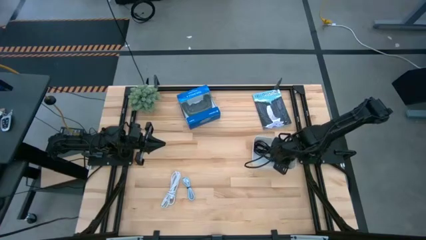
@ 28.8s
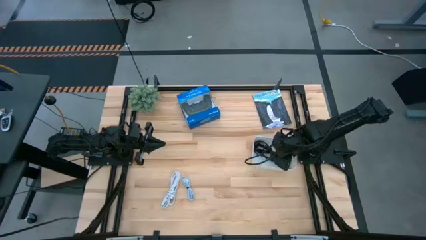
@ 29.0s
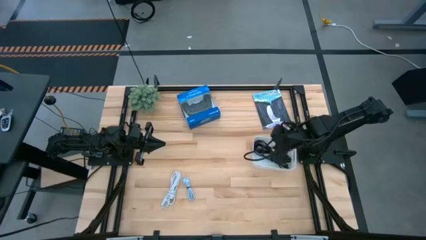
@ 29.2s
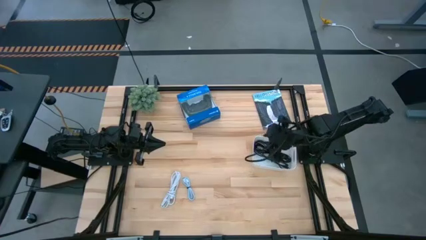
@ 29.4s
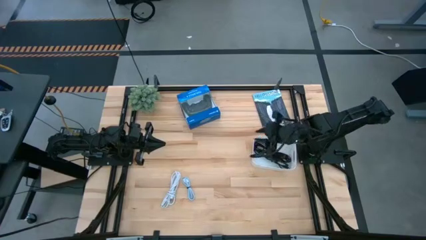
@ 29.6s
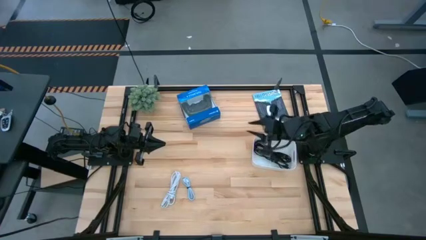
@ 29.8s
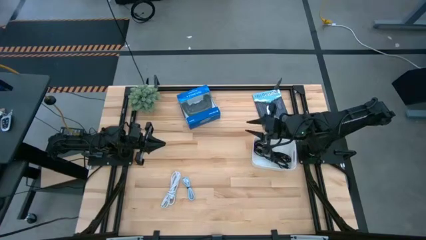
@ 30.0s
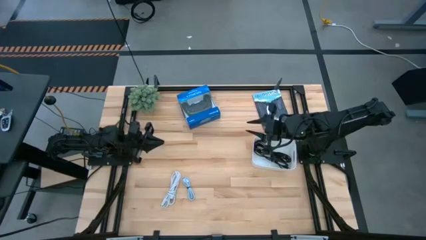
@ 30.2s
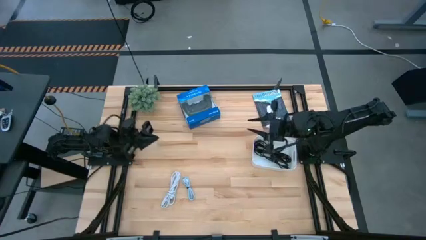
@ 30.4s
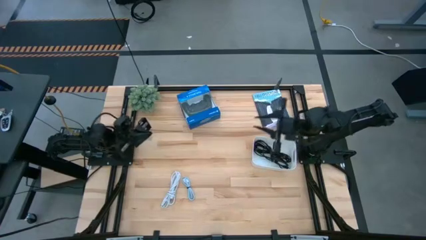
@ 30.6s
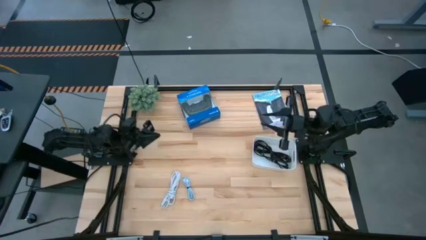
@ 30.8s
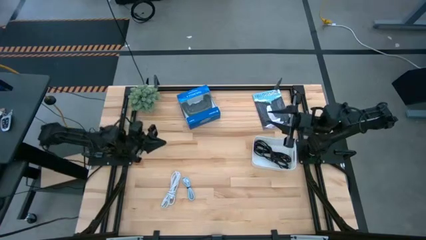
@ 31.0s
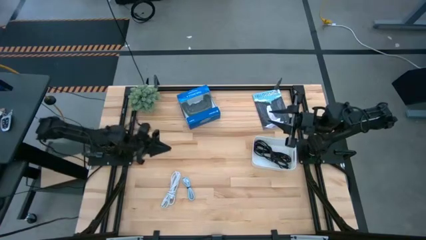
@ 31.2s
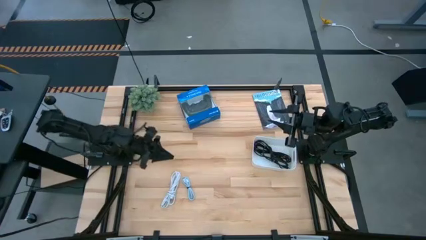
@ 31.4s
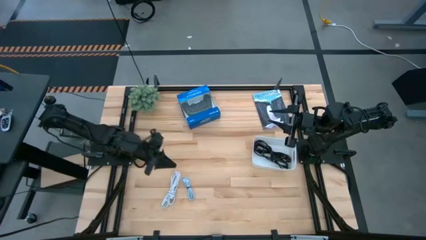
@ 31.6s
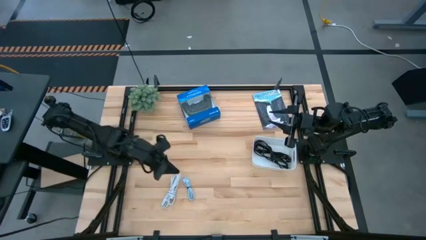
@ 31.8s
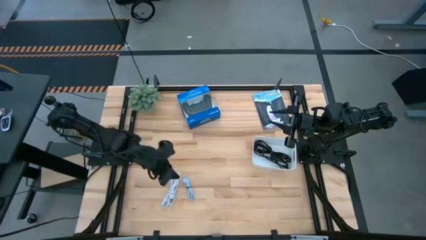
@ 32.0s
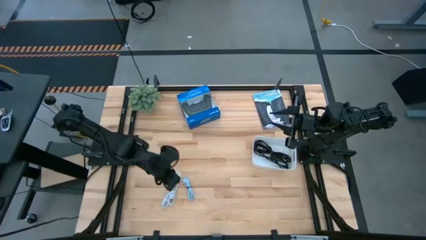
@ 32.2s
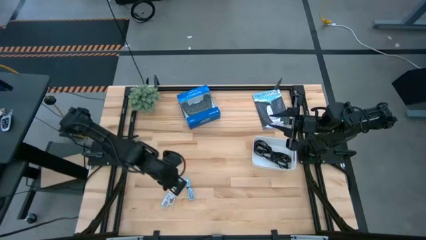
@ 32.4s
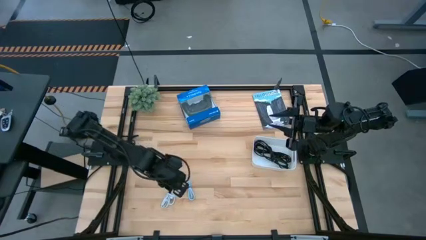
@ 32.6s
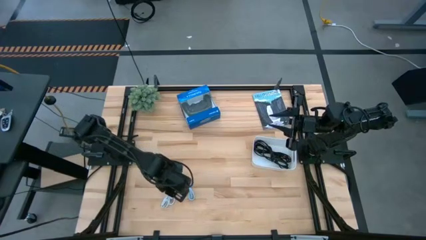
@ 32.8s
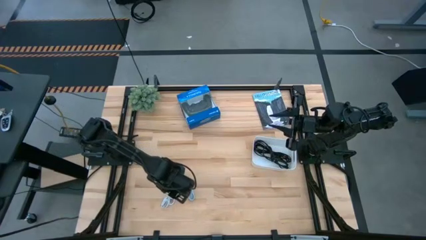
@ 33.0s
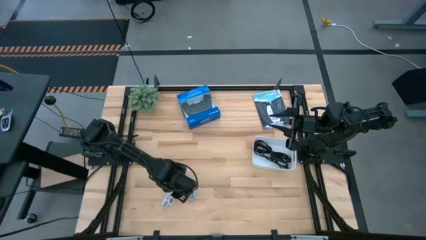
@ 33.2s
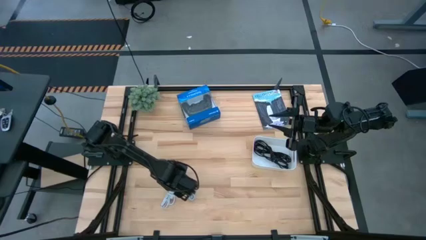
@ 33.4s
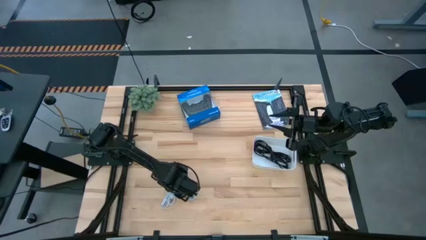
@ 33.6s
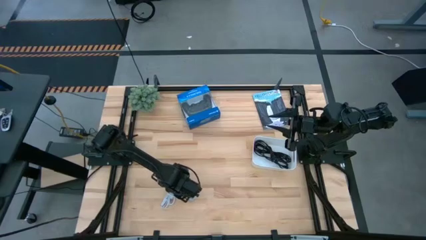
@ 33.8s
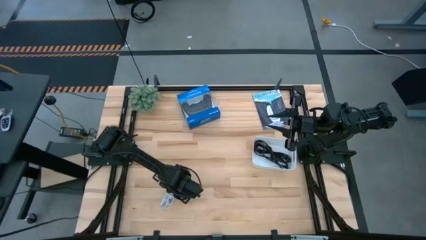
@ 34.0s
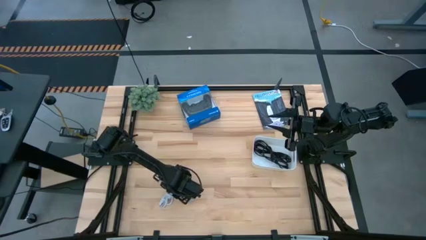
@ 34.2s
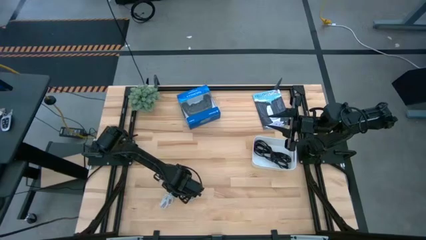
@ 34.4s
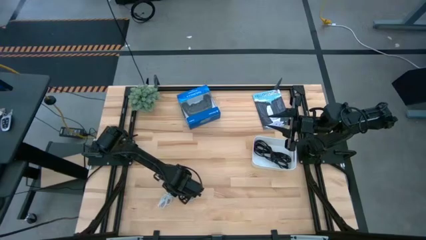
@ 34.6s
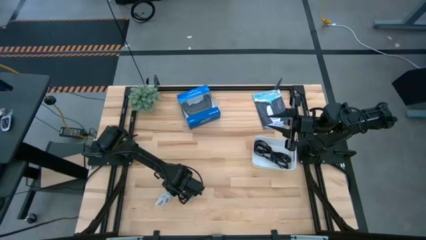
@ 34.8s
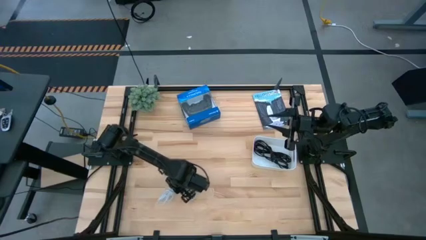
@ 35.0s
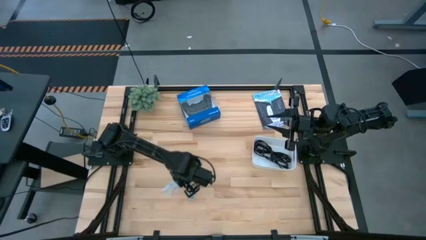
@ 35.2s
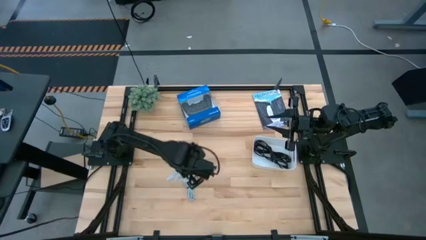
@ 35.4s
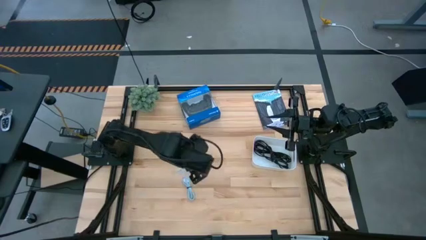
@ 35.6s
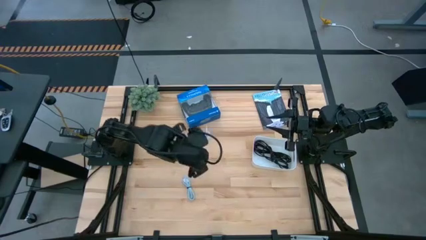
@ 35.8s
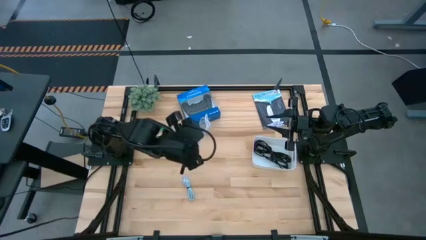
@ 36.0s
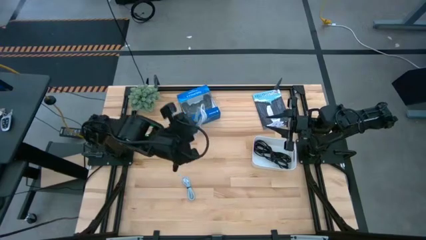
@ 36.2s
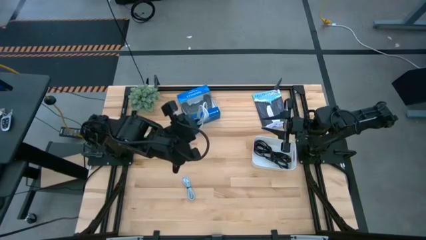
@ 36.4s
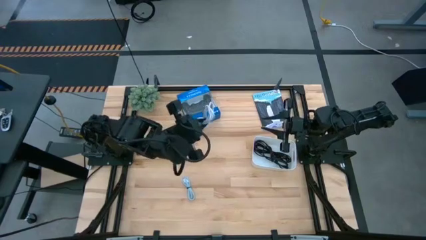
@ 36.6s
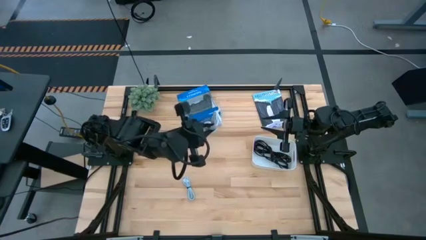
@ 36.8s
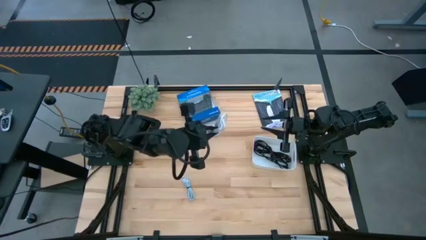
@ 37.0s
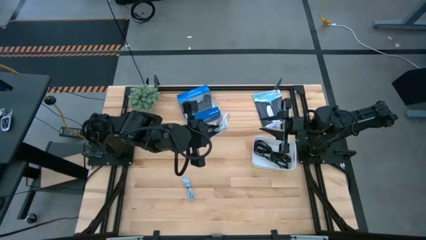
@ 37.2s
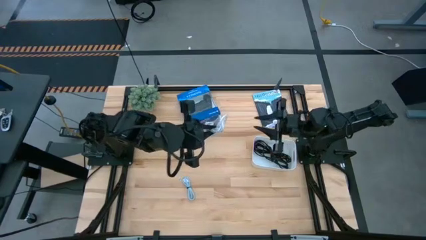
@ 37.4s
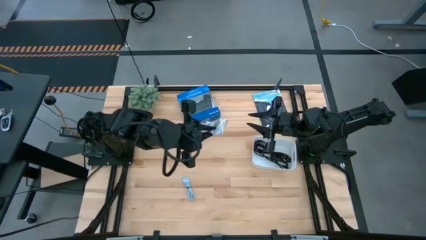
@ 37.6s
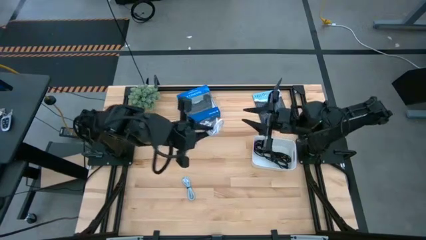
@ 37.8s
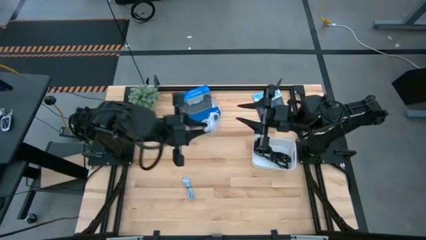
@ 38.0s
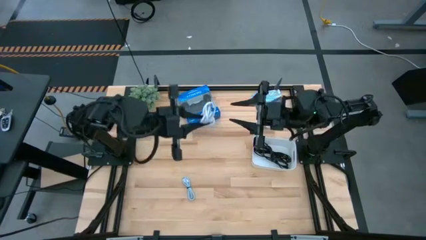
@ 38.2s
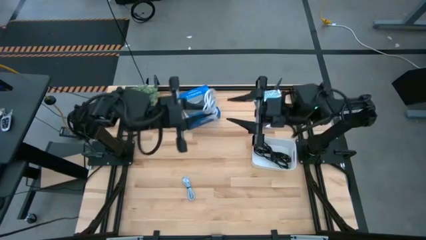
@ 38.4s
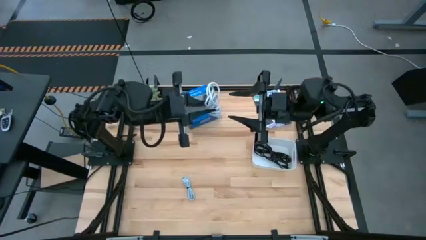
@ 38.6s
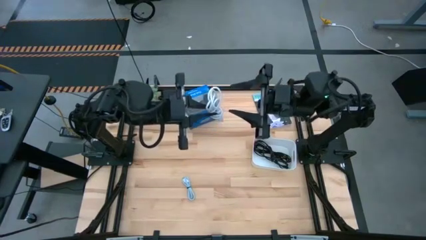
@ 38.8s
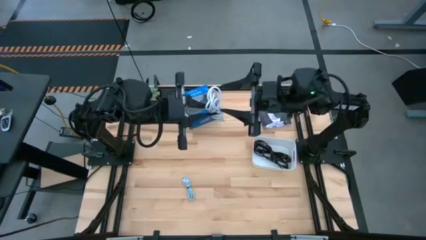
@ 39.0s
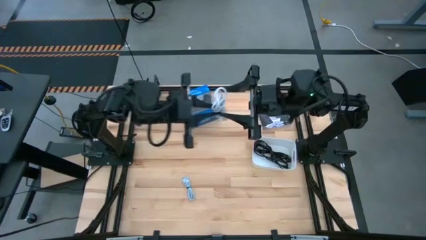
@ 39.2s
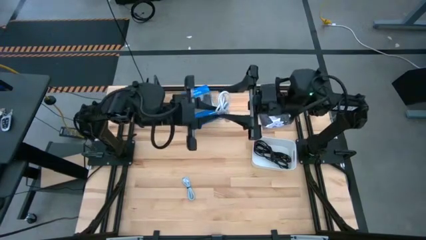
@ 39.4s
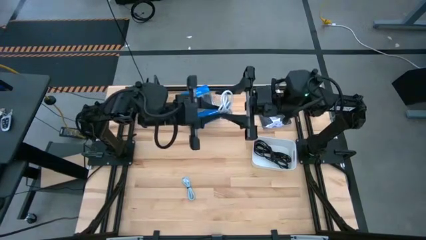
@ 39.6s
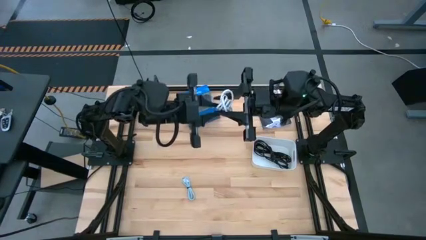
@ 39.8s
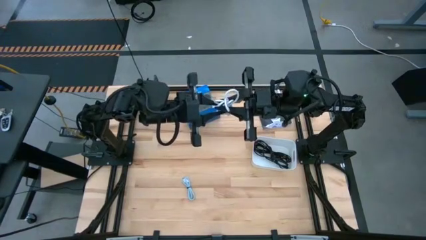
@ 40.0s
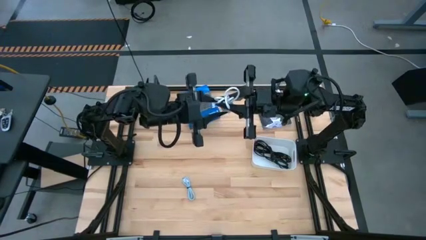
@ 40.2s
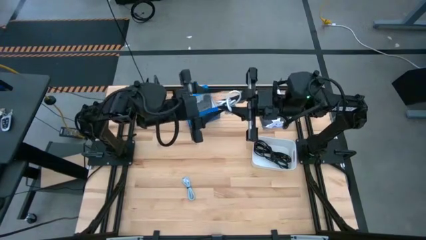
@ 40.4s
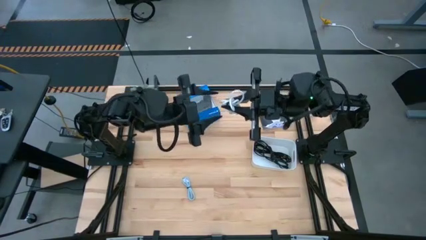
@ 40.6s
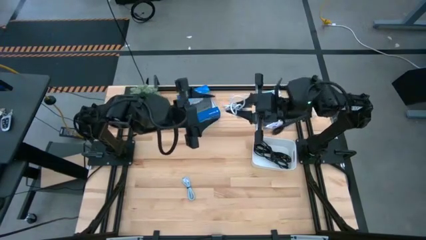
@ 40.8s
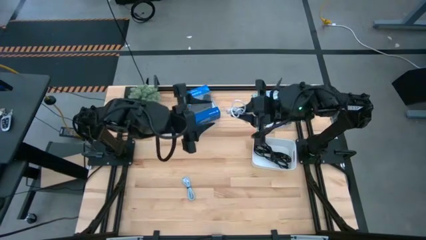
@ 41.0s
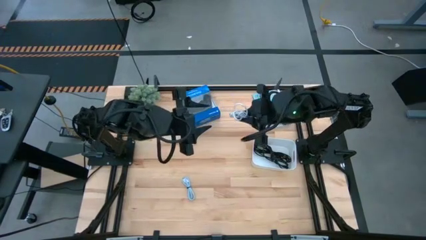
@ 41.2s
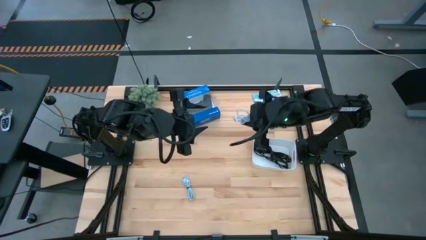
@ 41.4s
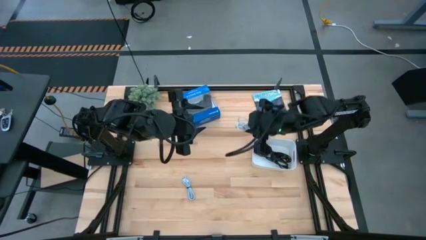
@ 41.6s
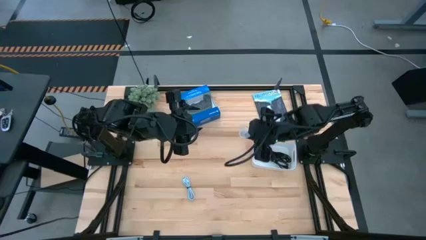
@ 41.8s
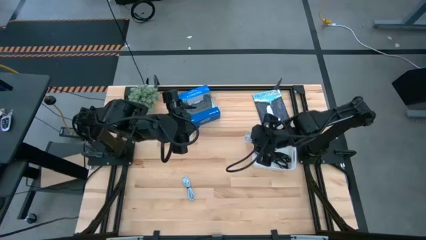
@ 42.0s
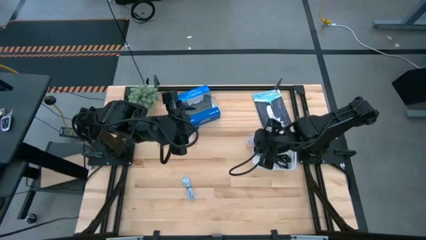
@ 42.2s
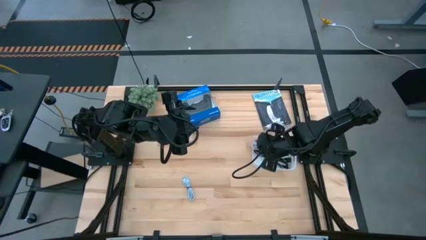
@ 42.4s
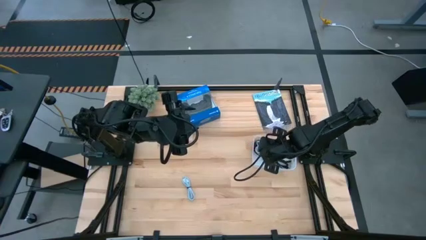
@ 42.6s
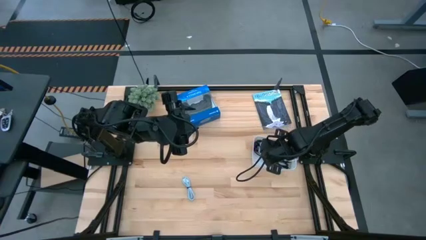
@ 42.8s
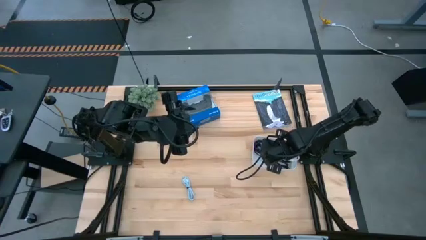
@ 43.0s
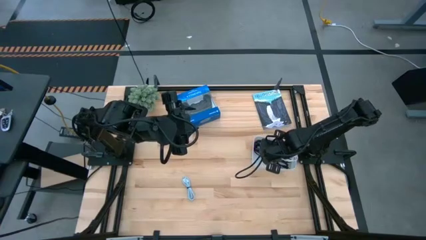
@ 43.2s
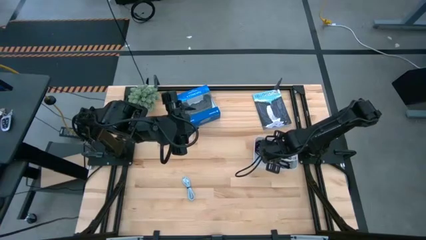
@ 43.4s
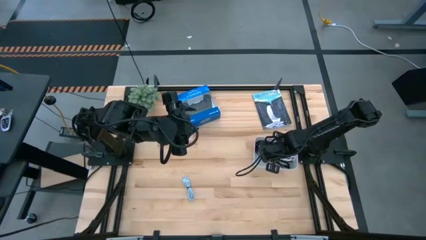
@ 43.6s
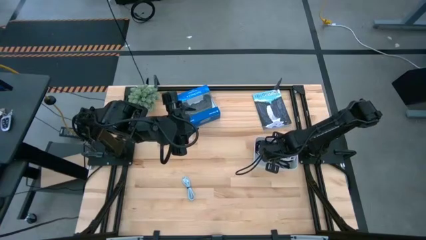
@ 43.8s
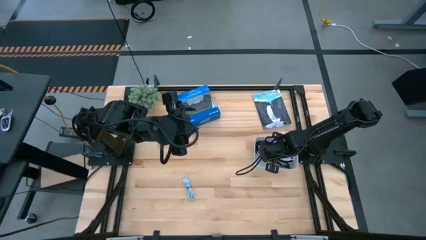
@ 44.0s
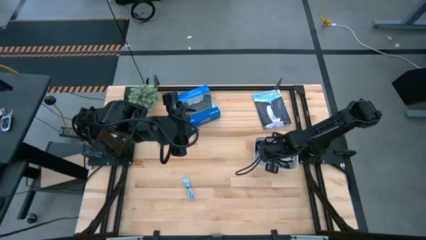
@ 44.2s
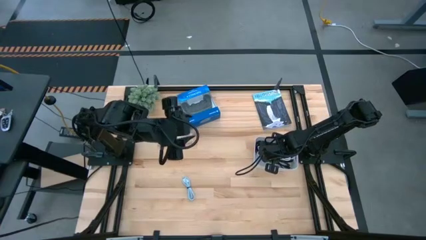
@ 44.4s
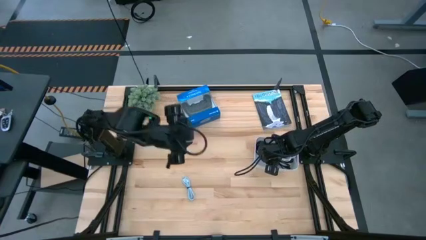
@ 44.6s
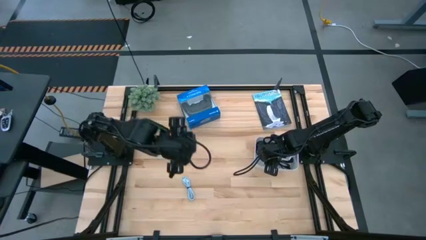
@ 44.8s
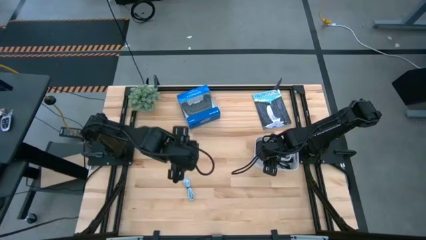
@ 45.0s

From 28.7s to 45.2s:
Task: Pick and place USB-C Cables
Put the white USB cable into the white bin
